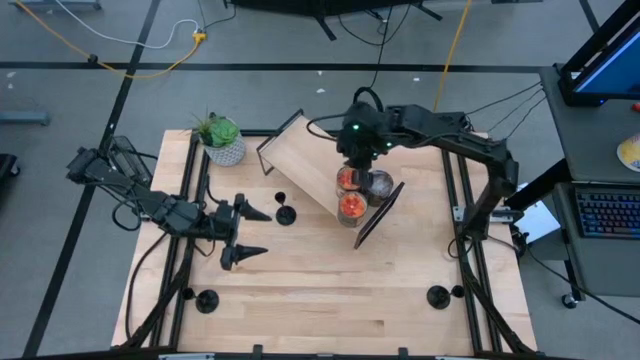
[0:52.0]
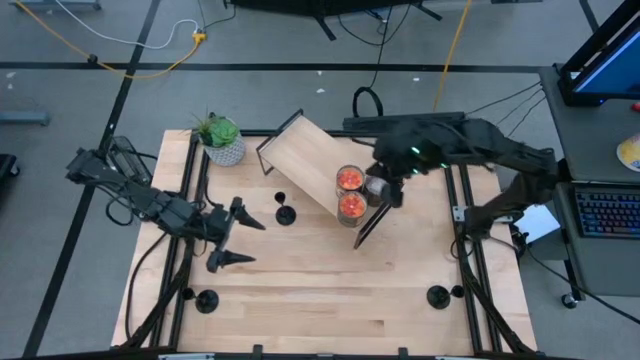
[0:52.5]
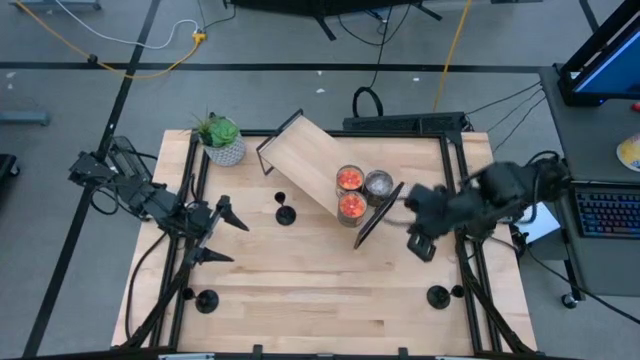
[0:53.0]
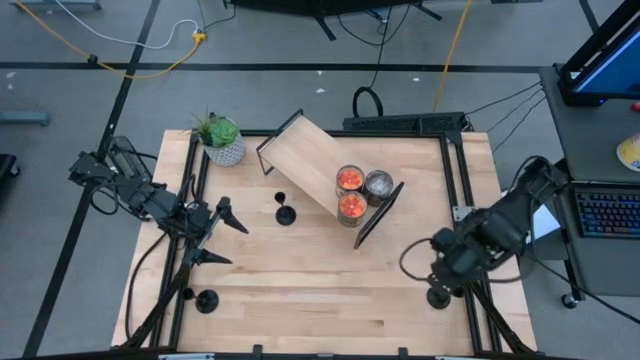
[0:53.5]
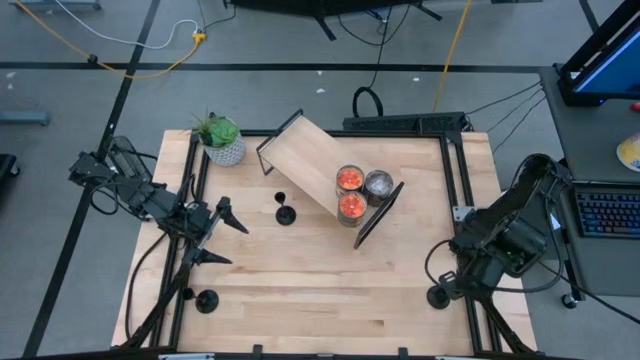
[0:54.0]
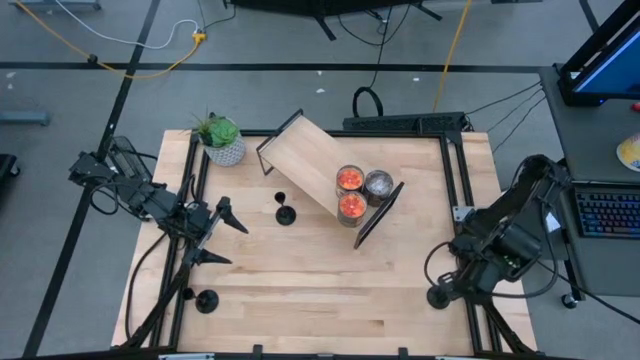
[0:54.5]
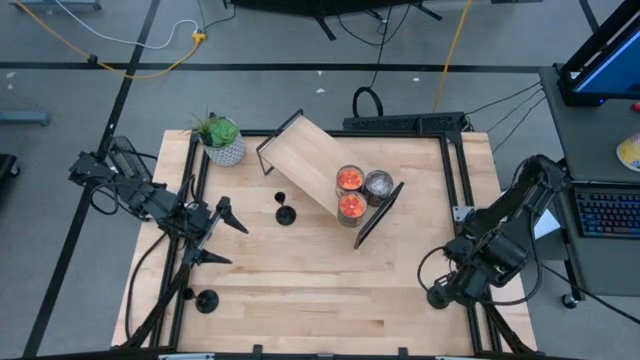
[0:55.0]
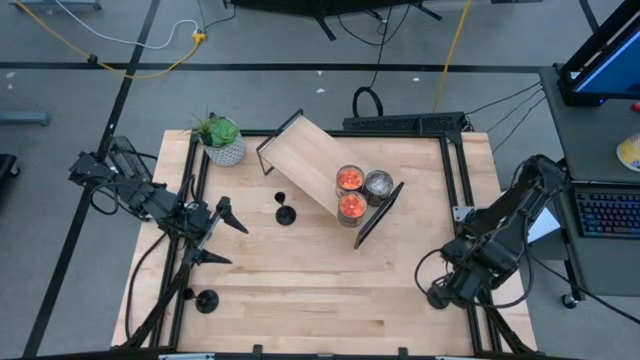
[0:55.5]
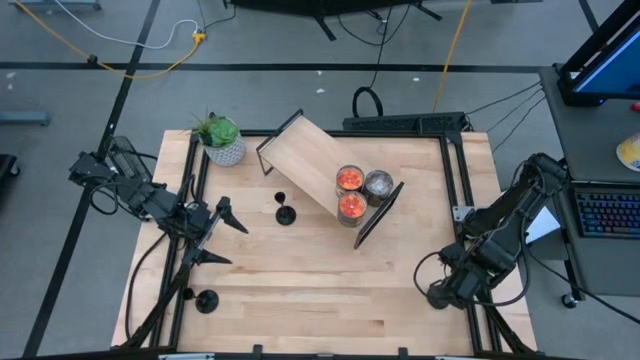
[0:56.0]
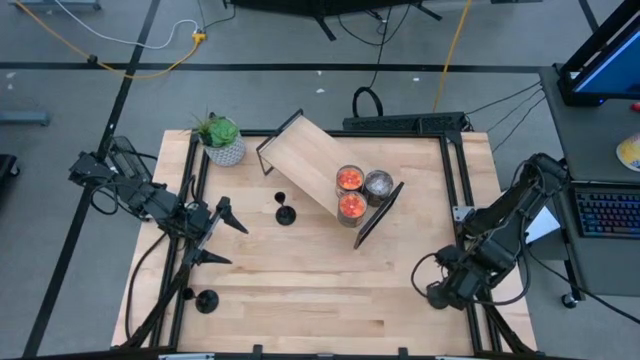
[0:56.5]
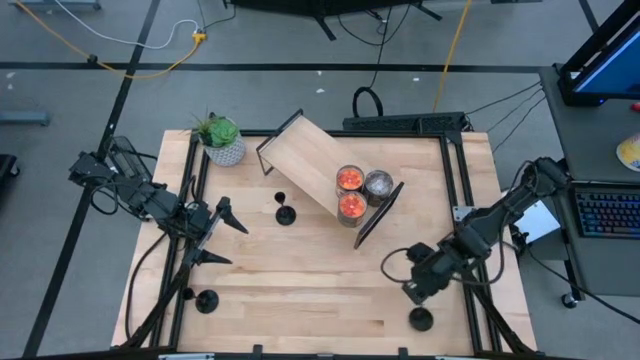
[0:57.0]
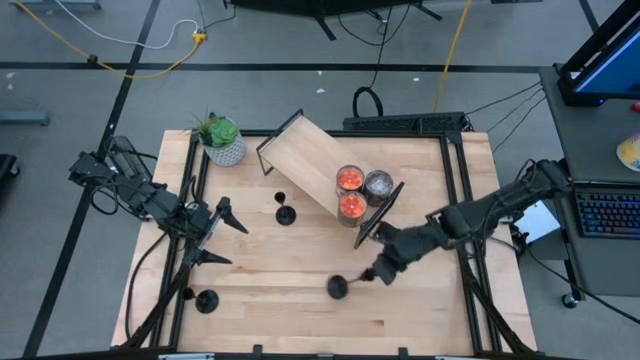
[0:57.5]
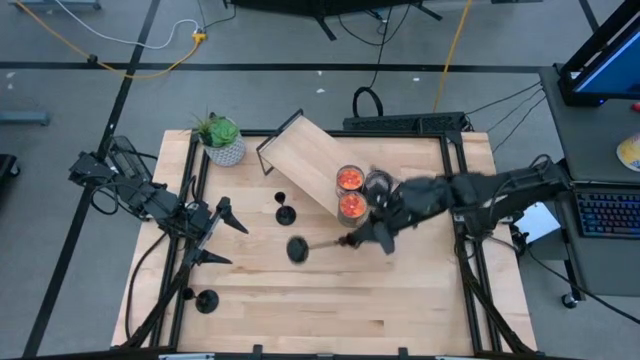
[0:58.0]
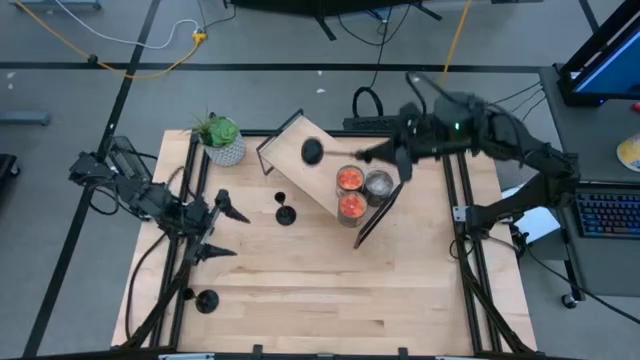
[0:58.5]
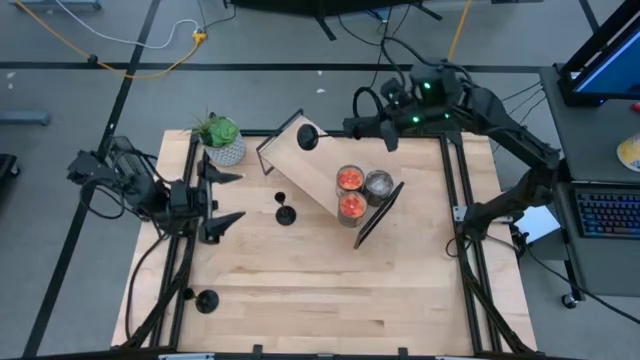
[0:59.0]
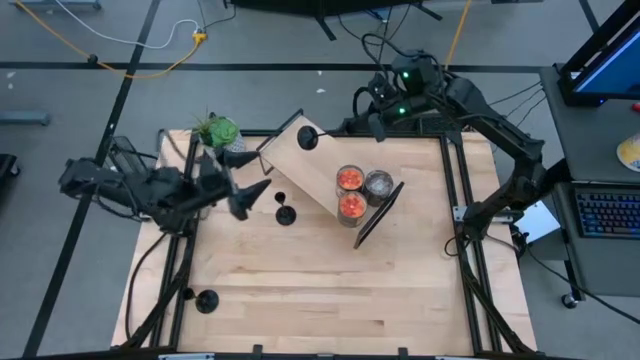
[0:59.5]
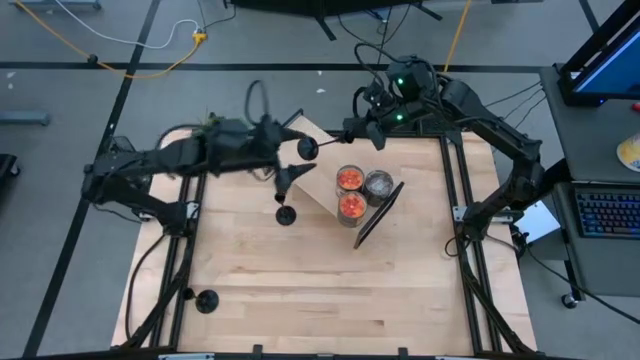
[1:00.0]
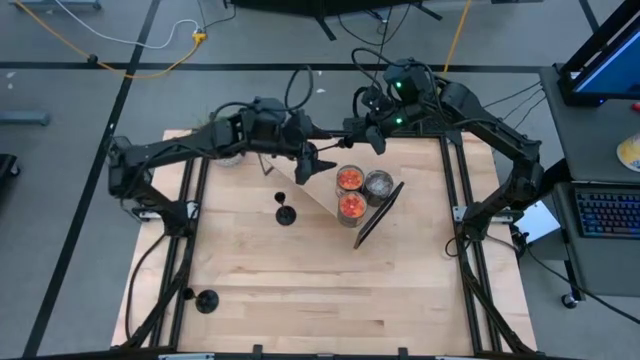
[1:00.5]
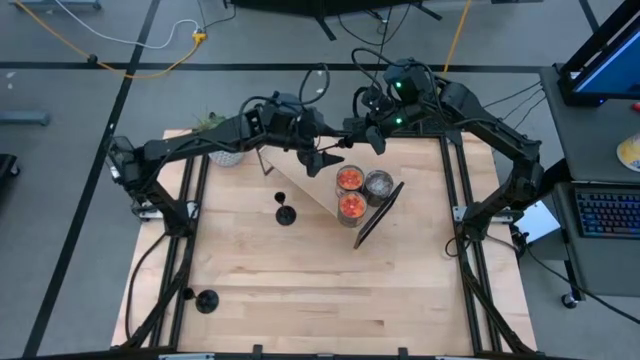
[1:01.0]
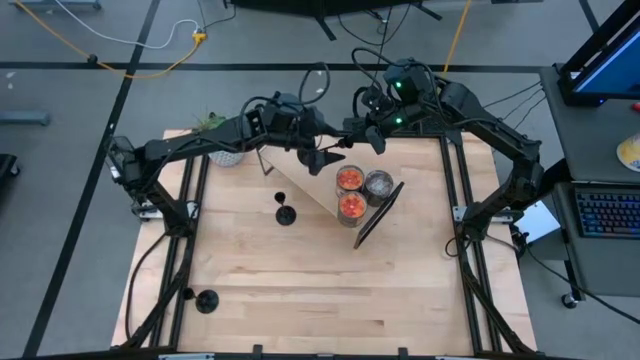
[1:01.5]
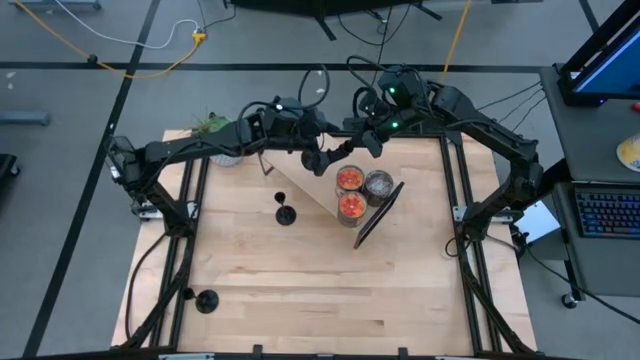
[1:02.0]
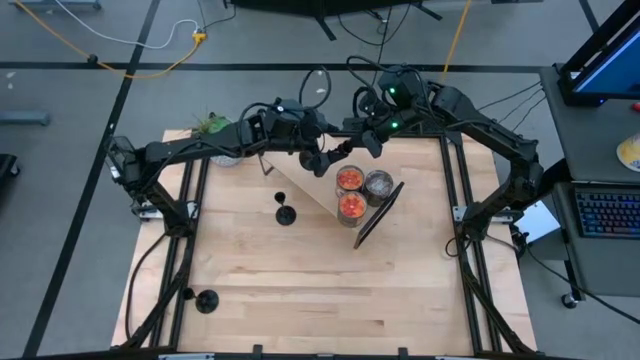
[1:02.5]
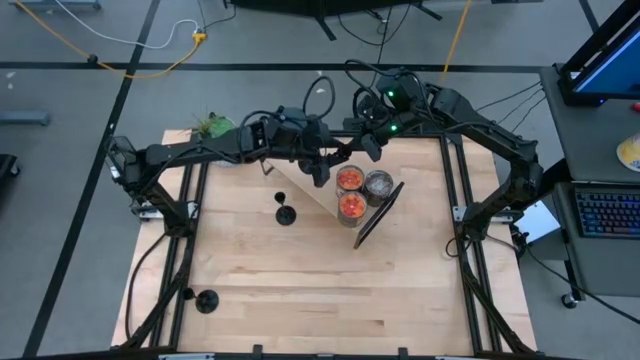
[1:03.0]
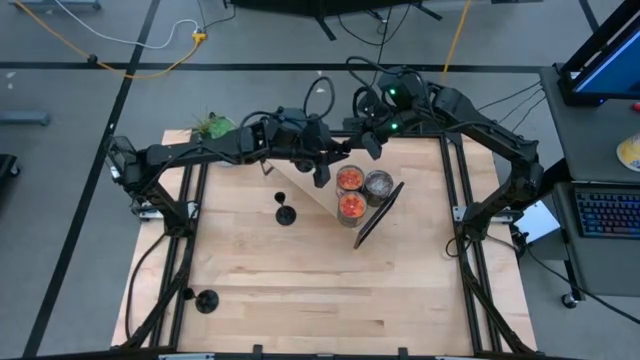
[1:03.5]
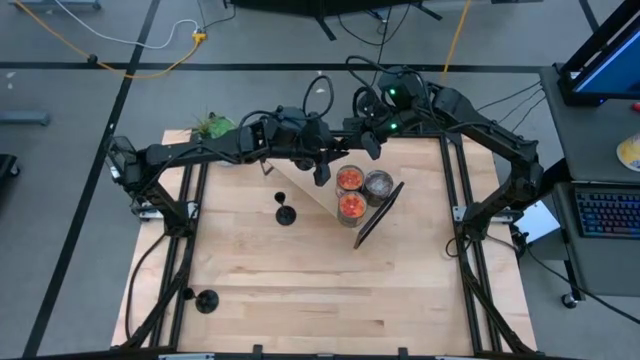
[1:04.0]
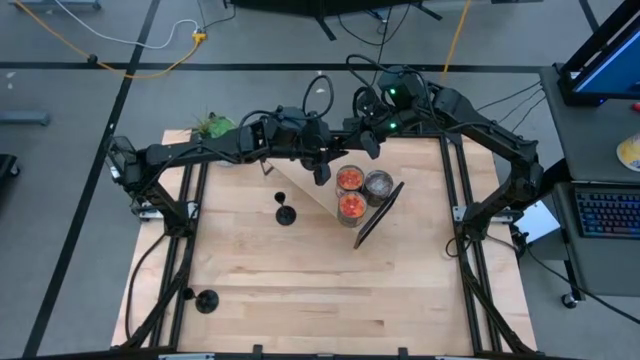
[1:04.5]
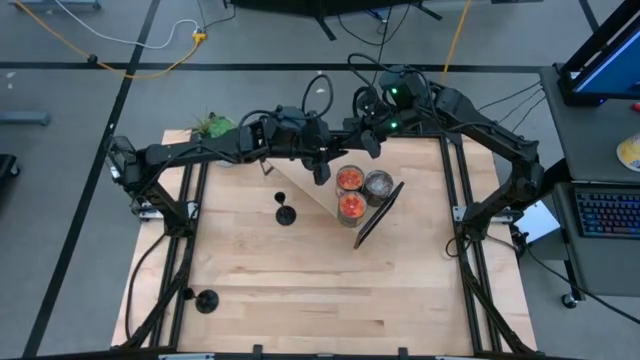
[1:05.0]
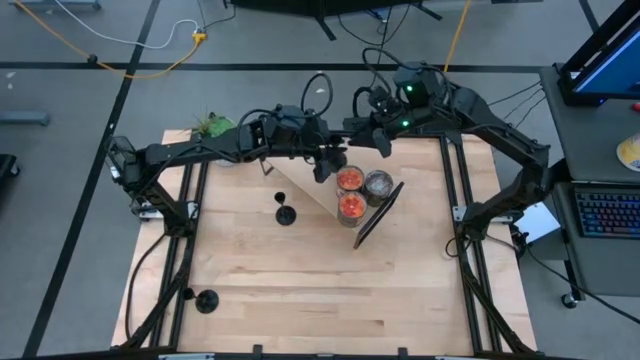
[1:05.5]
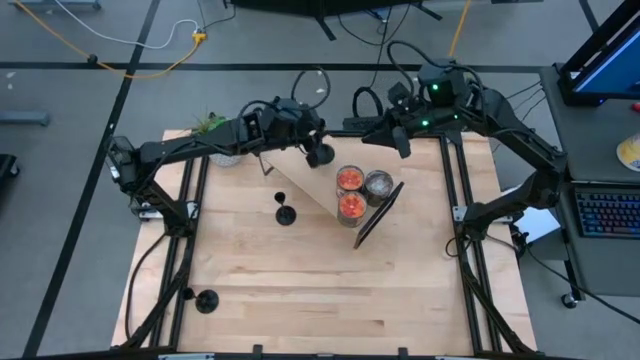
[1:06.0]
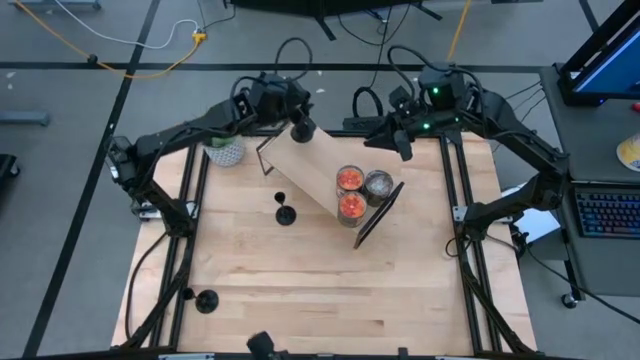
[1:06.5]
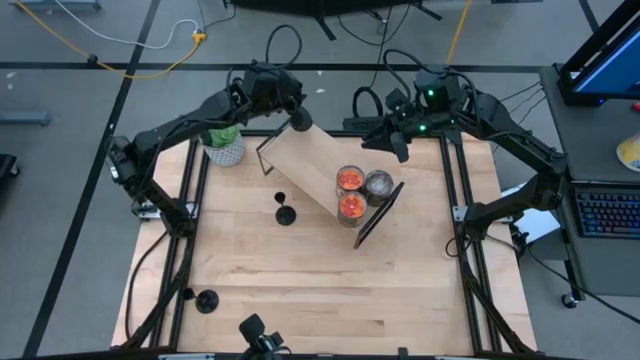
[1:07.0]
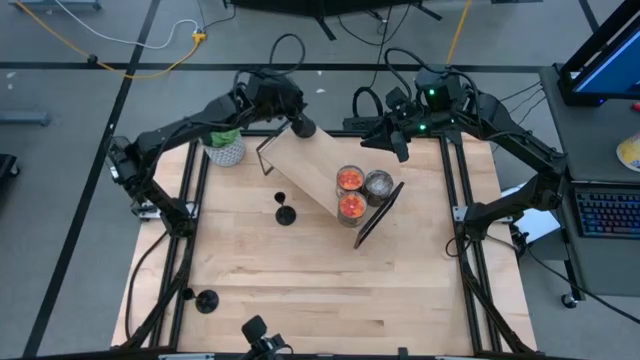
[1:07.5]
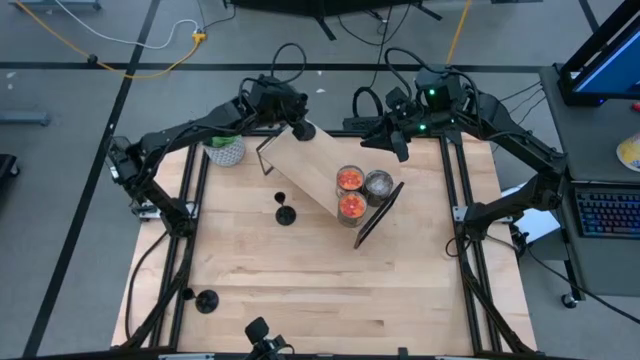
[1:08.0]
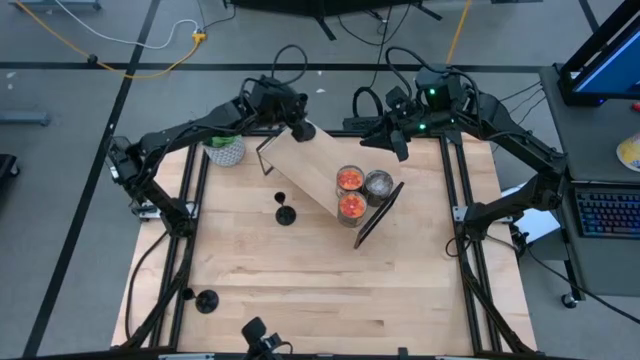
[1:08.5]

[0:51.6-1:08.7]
Task: Pick & Place candle stick holders
Put the bottom right black candle holder on the shelf

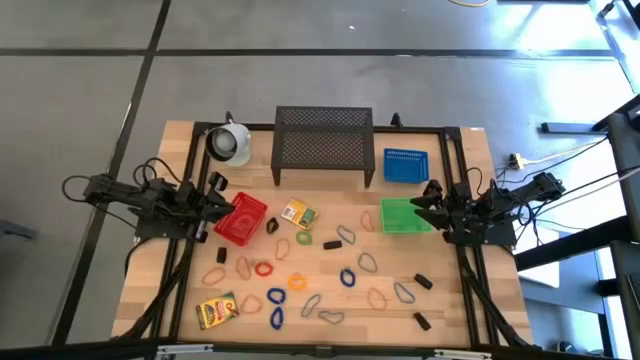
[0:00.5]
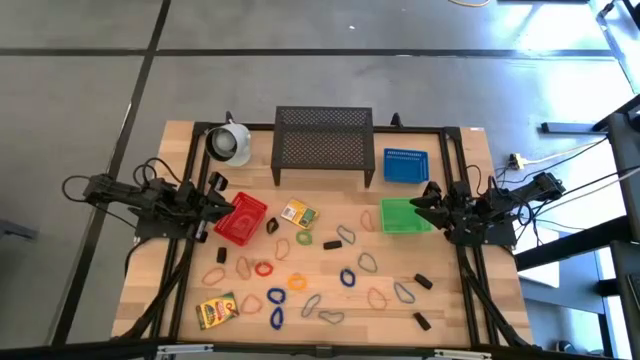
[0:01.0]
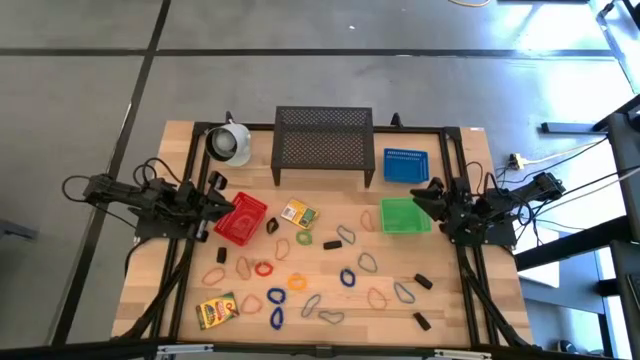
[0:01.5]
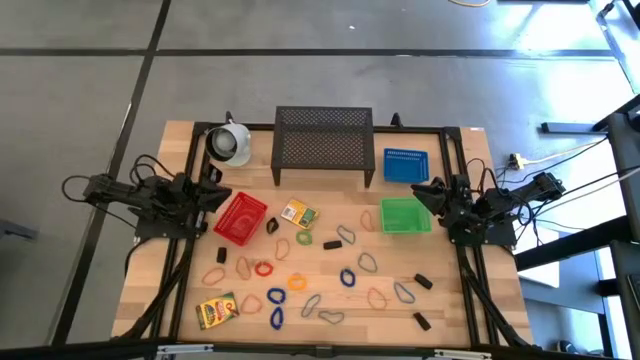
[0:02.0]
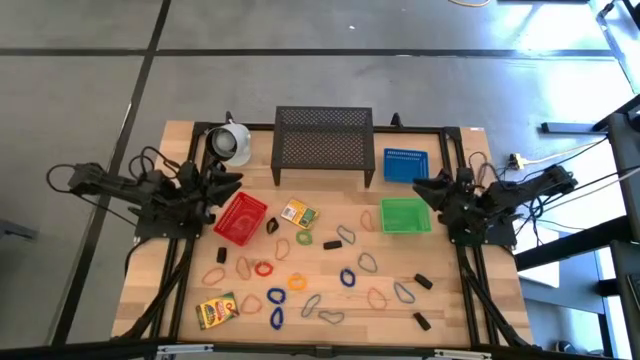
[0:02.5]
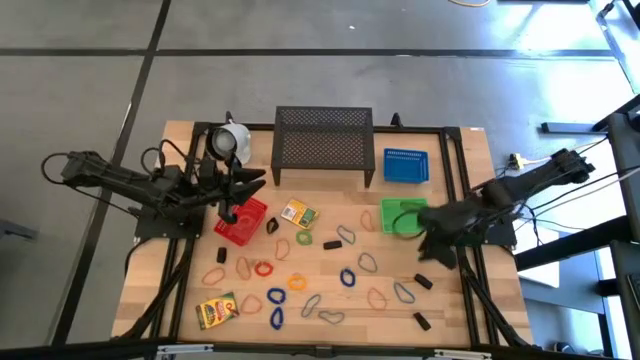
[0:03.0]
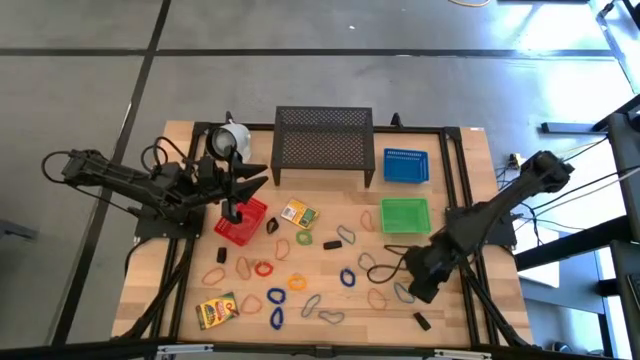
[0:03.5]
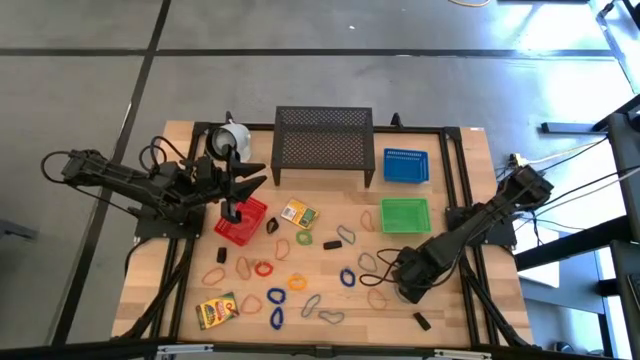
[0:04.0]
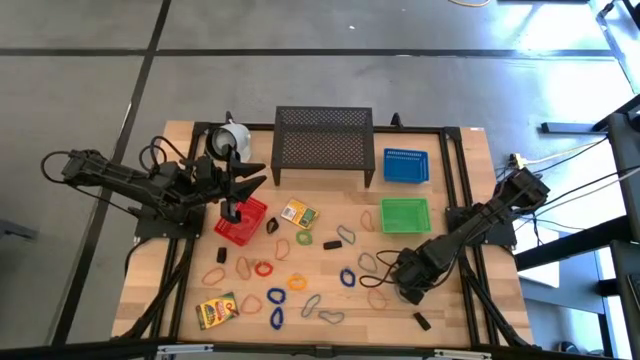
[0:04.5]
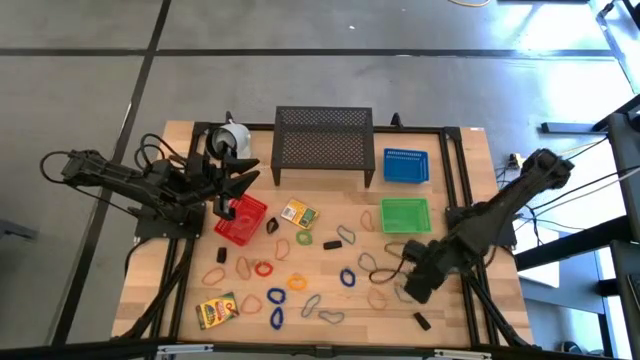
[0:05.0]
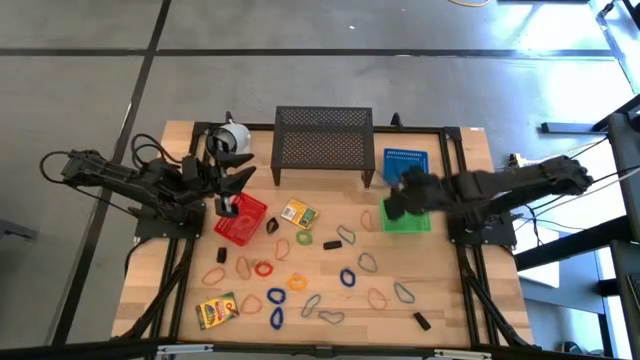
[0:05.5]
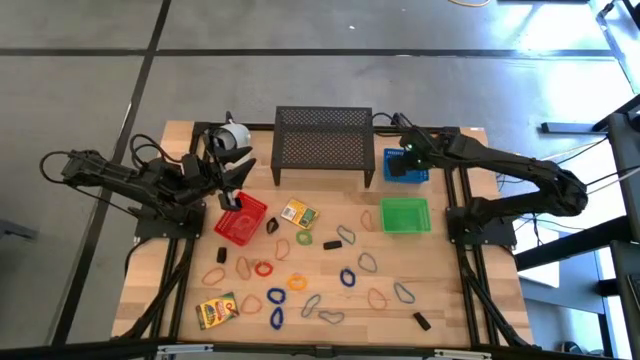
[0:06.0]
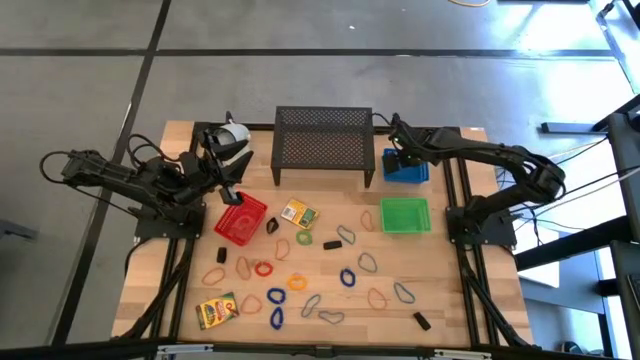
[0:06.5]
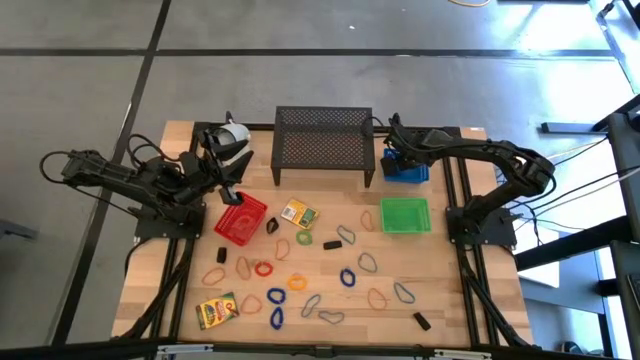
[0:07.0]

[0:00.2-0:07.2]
Task: Pick & Place Office Desk Supplies
Put the black rubber band into the blue bin
